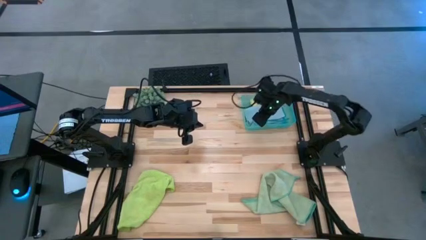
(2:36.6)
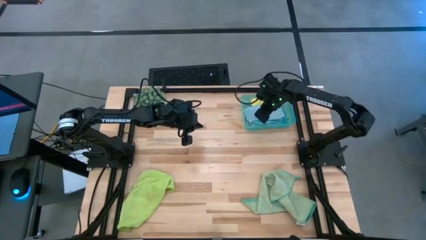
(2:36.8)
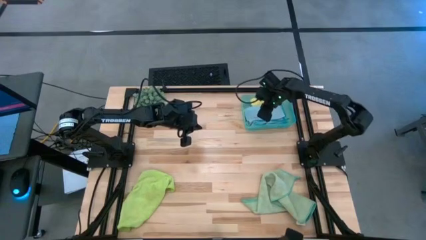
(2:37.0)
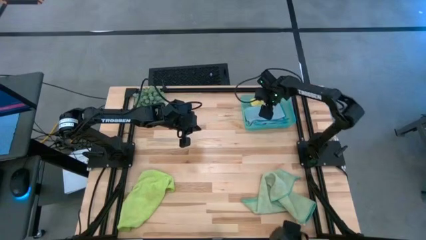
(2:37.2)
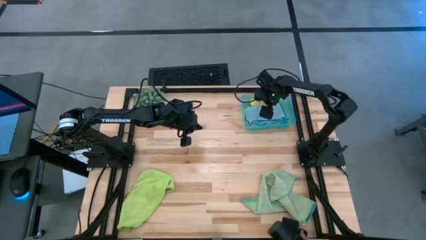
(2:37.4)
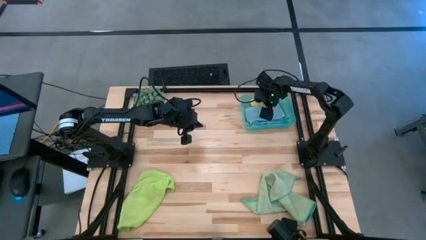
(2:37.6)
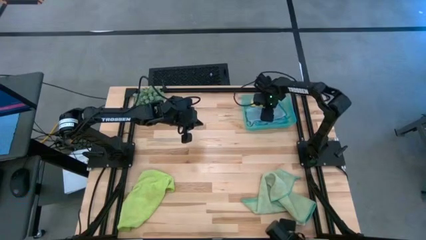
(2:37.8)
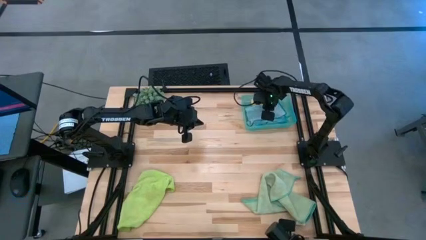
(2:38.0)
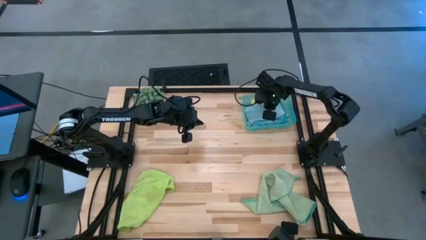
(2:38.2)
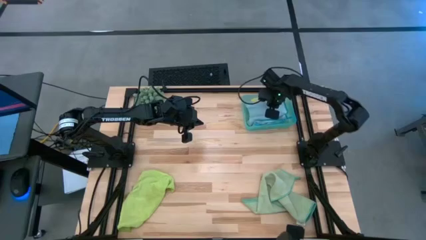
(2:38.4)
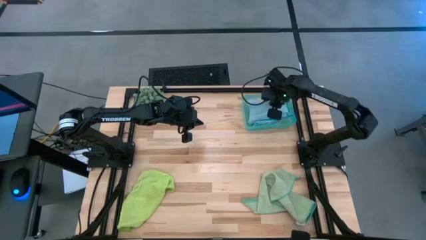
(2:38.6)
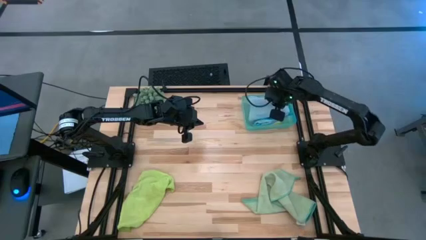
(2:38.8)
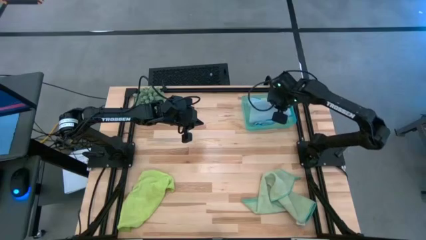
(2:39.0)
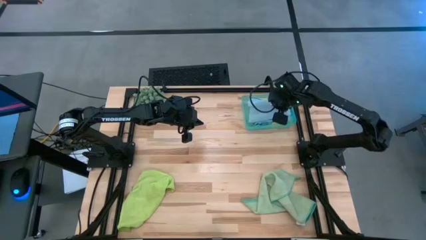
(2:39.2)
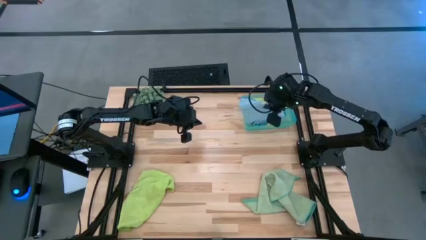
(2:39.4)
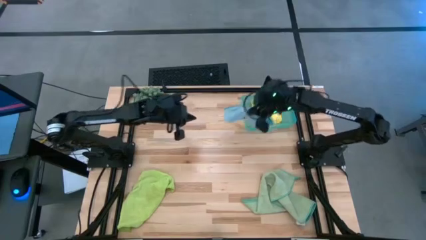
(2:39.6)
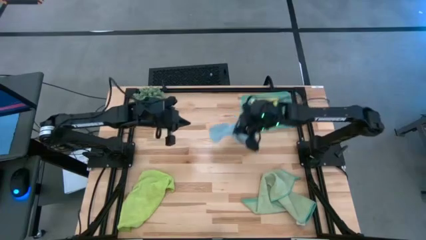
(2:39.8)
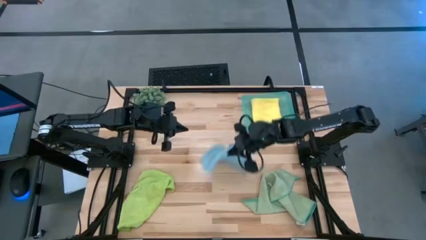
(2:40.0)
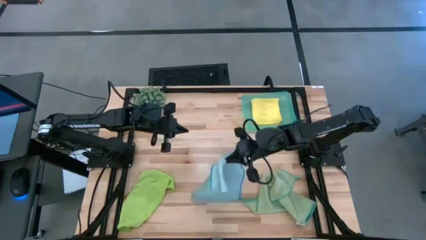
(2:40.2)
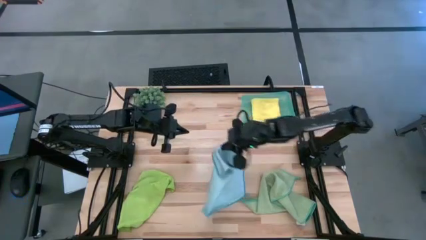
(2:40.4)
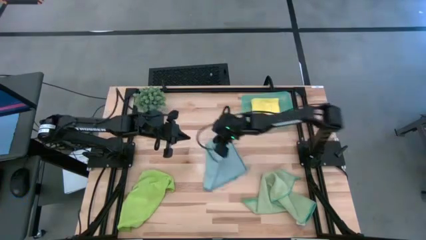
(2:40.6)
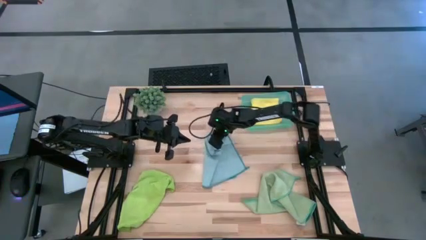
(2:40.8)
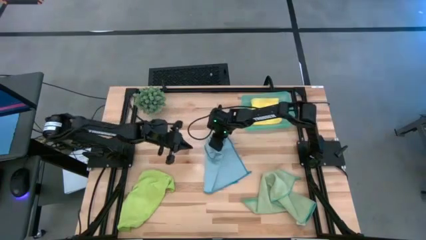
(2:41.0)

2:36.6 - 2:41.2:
Task: Fold microfiber towels
Remove the blue microfiber cloth from the blue bin

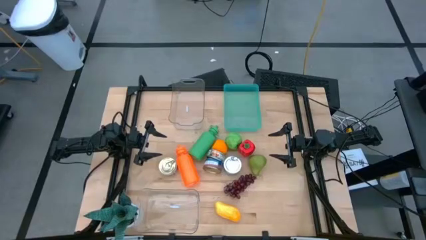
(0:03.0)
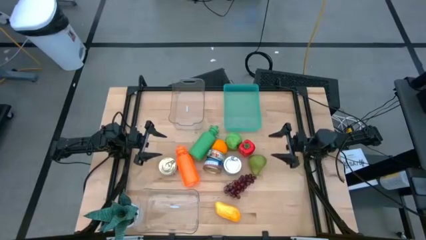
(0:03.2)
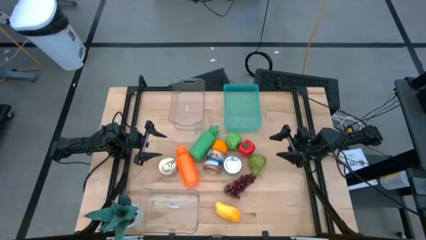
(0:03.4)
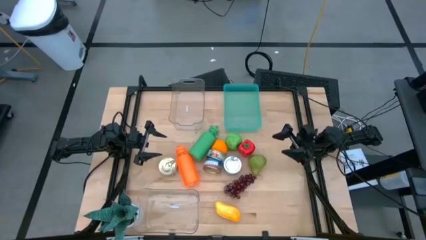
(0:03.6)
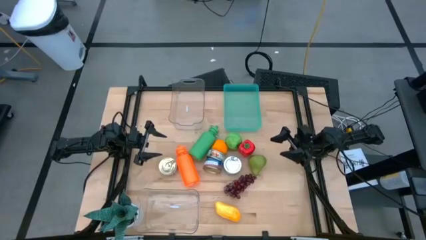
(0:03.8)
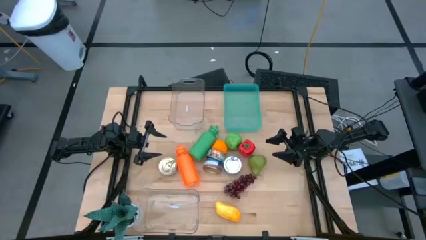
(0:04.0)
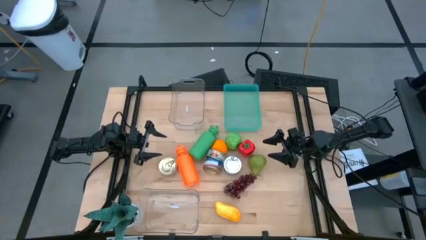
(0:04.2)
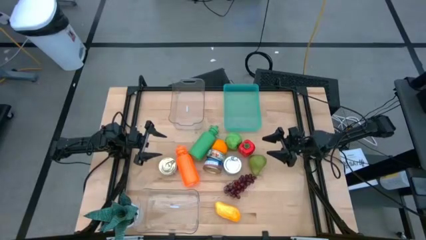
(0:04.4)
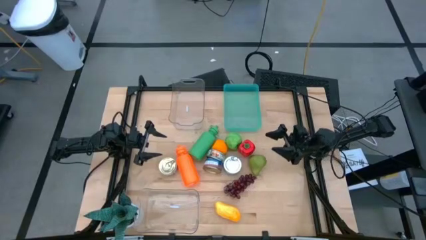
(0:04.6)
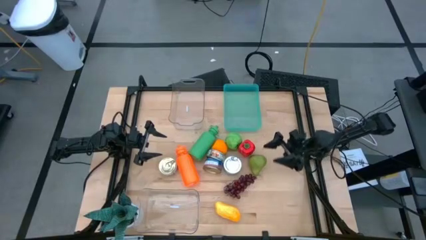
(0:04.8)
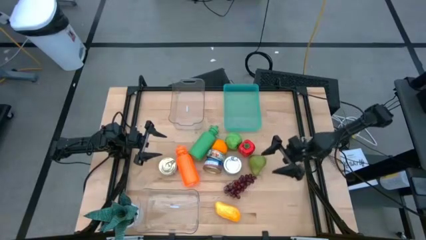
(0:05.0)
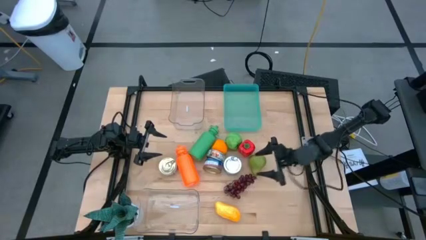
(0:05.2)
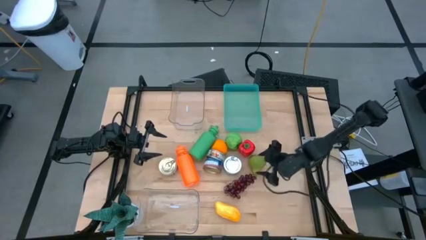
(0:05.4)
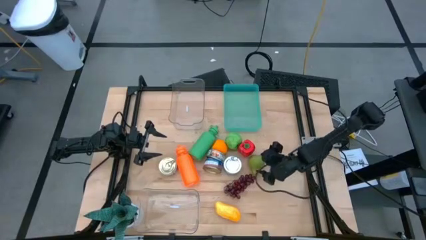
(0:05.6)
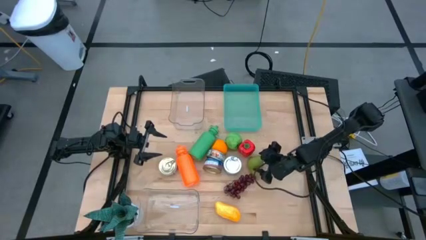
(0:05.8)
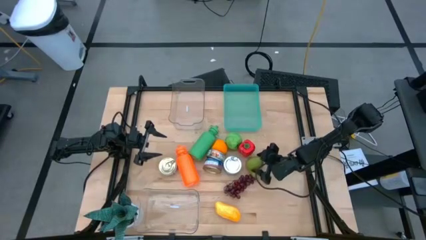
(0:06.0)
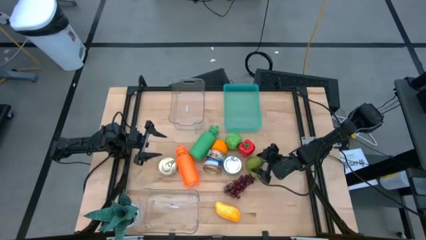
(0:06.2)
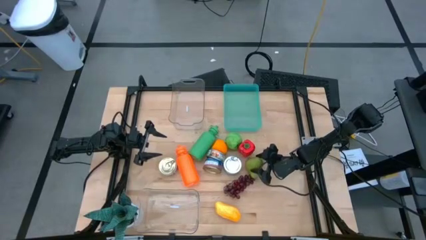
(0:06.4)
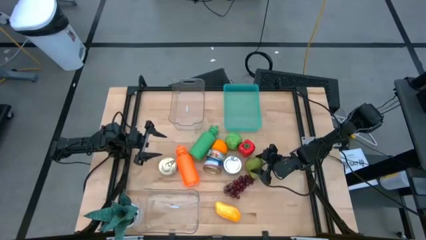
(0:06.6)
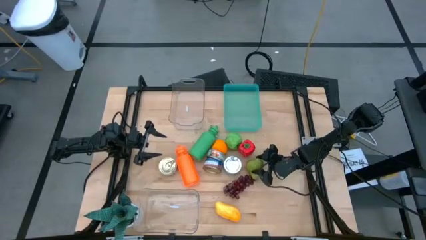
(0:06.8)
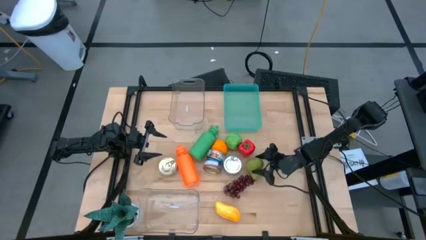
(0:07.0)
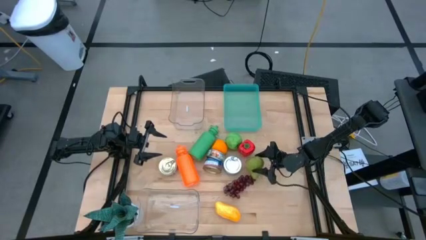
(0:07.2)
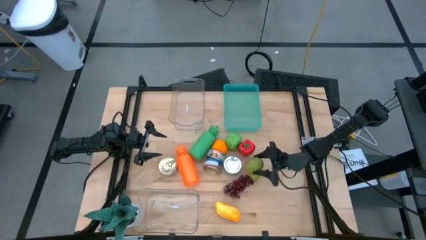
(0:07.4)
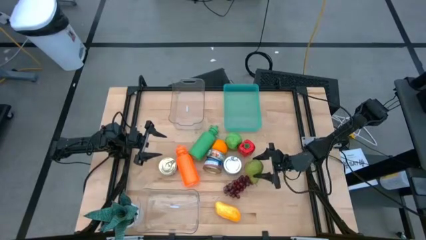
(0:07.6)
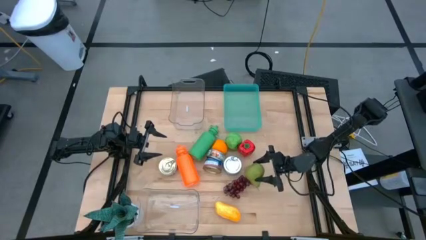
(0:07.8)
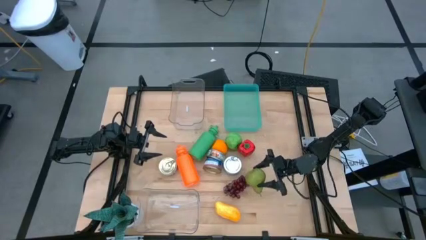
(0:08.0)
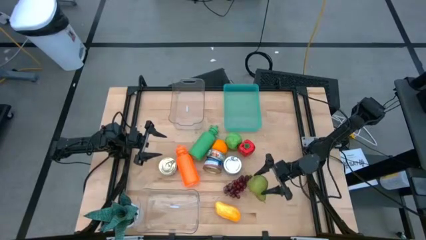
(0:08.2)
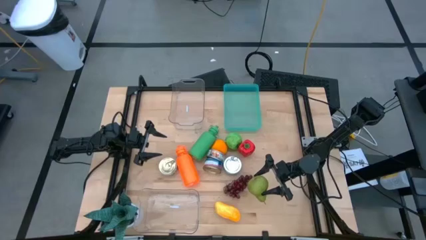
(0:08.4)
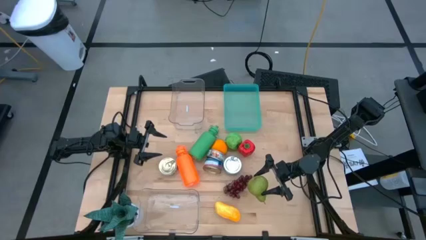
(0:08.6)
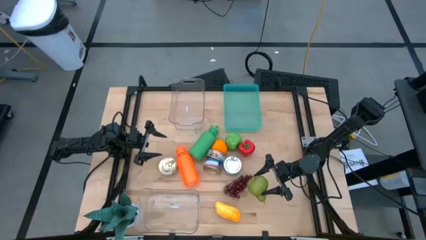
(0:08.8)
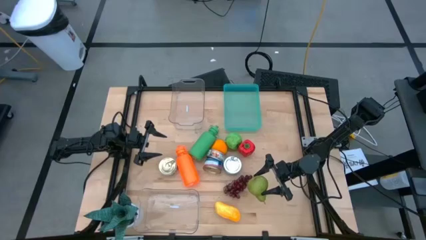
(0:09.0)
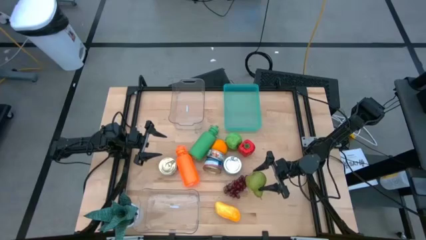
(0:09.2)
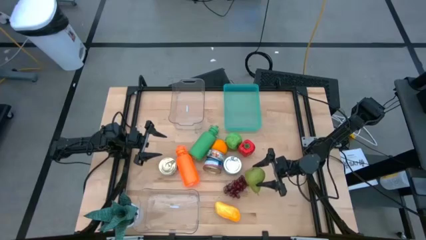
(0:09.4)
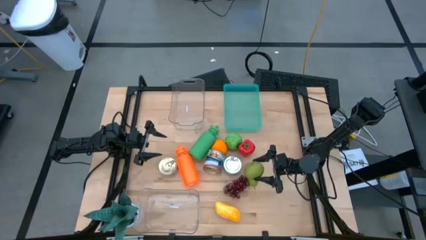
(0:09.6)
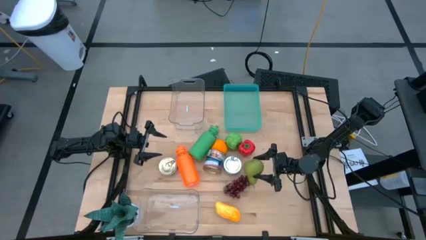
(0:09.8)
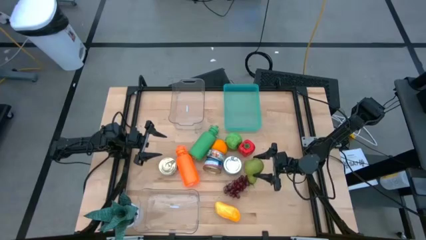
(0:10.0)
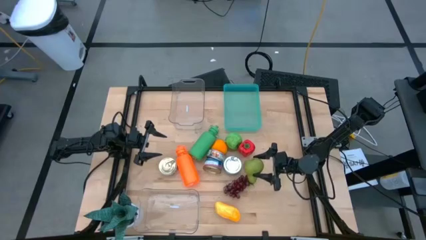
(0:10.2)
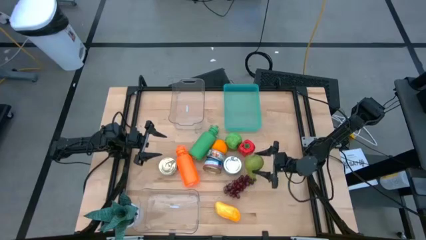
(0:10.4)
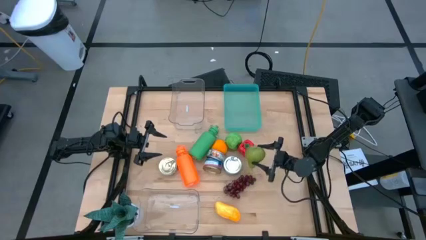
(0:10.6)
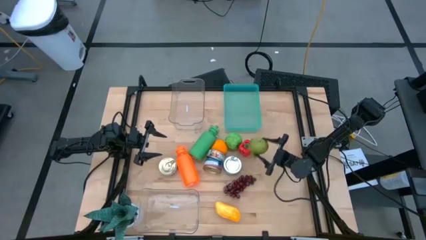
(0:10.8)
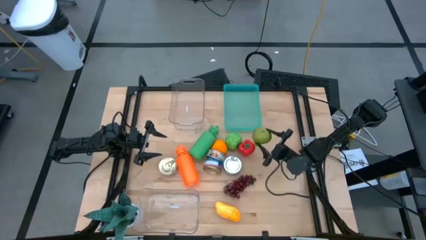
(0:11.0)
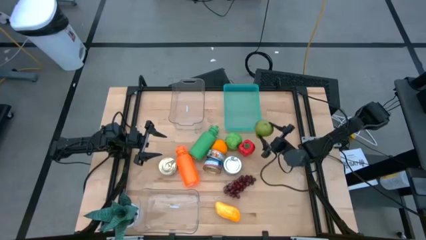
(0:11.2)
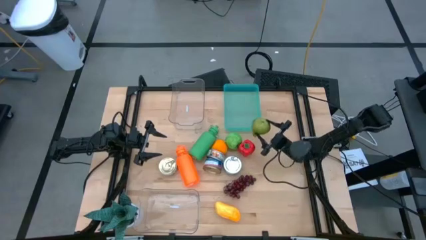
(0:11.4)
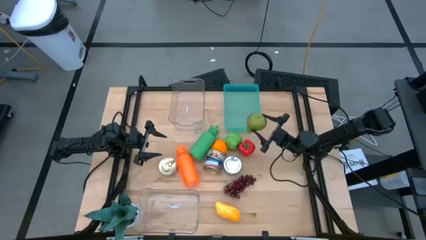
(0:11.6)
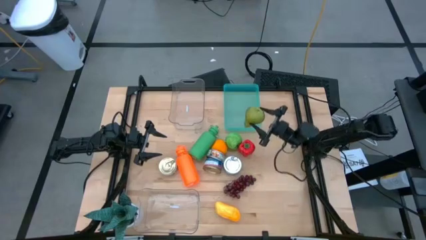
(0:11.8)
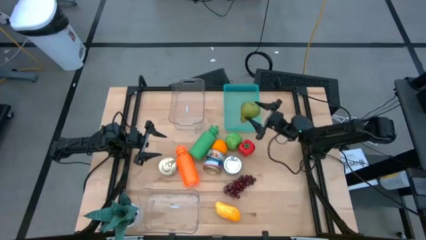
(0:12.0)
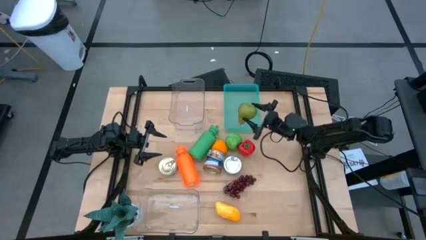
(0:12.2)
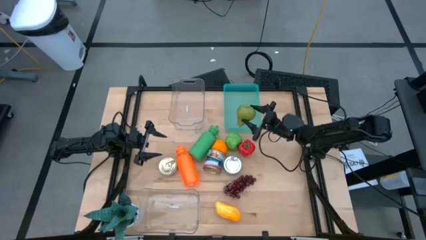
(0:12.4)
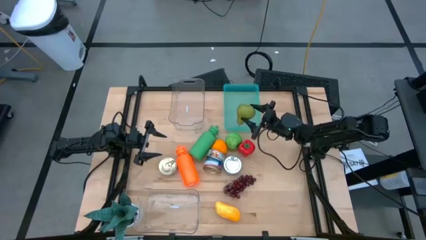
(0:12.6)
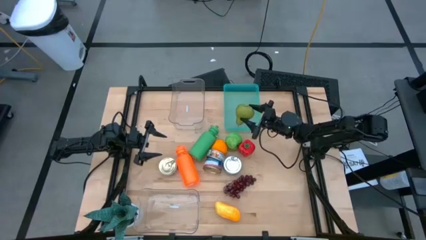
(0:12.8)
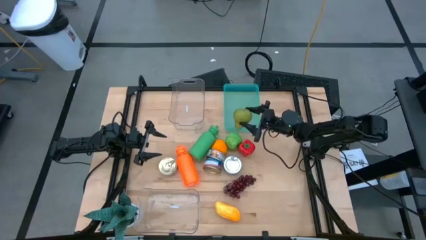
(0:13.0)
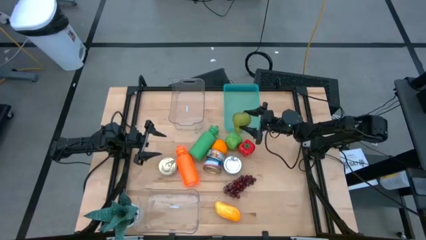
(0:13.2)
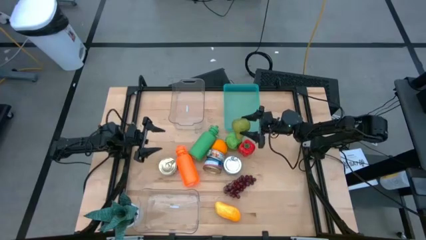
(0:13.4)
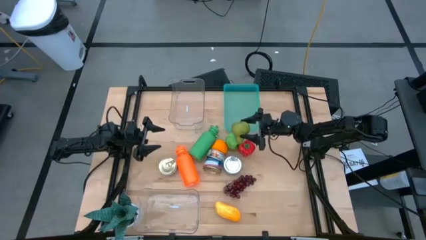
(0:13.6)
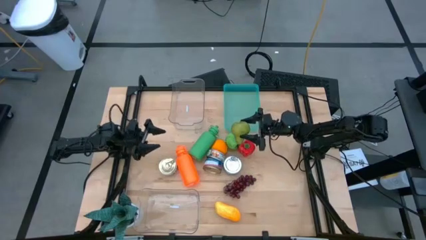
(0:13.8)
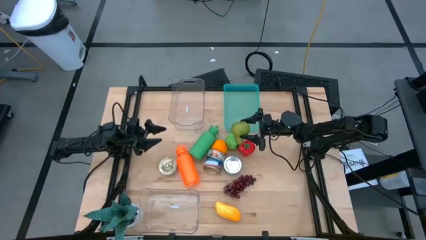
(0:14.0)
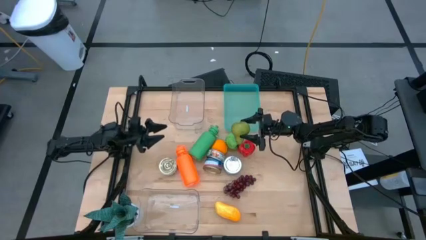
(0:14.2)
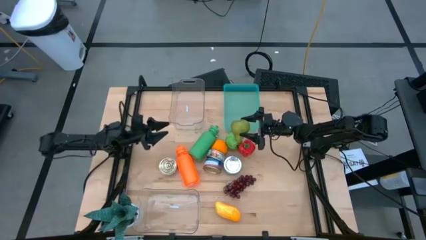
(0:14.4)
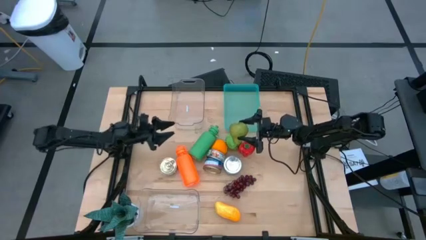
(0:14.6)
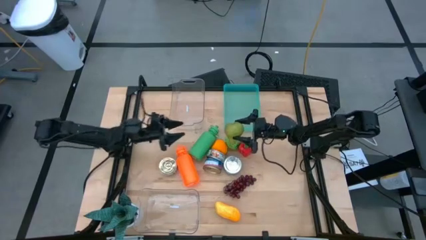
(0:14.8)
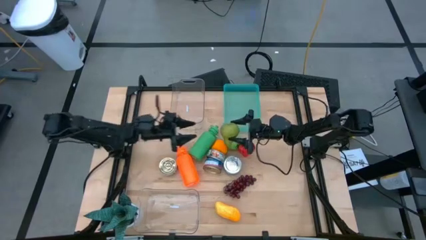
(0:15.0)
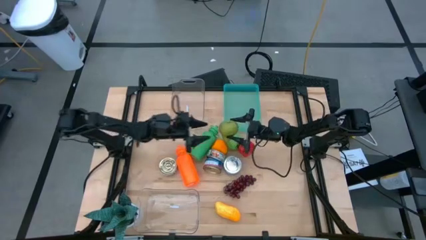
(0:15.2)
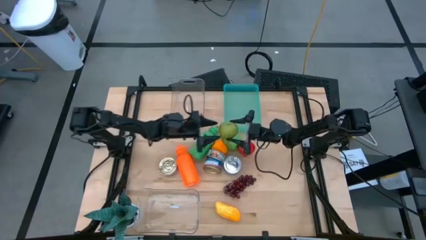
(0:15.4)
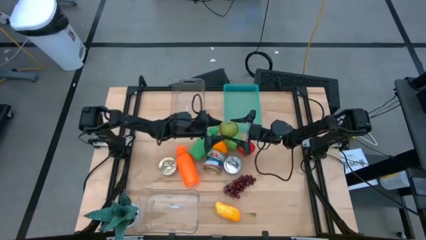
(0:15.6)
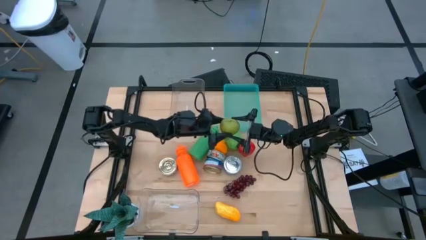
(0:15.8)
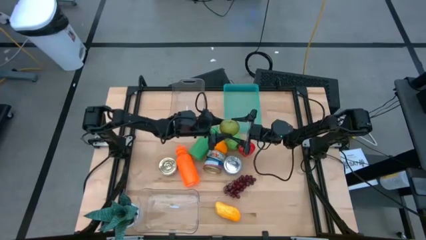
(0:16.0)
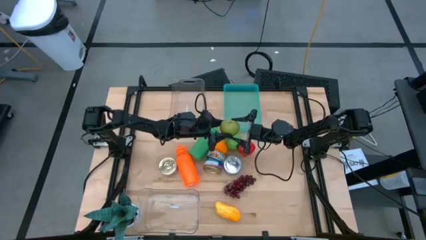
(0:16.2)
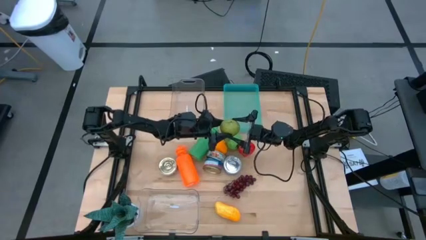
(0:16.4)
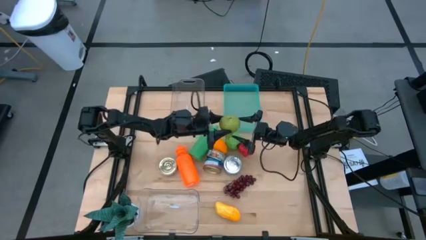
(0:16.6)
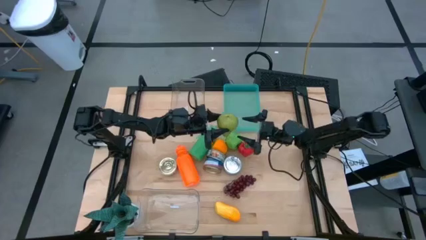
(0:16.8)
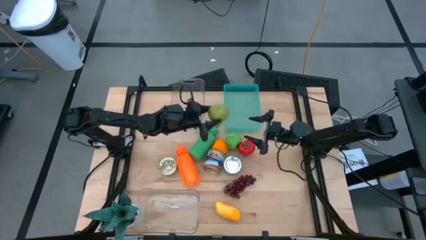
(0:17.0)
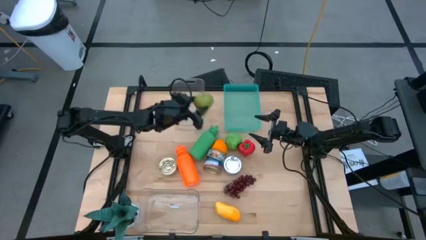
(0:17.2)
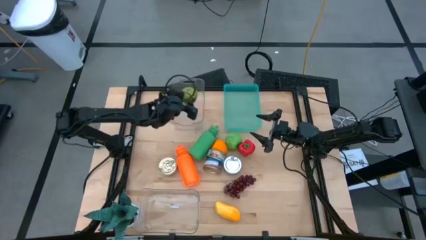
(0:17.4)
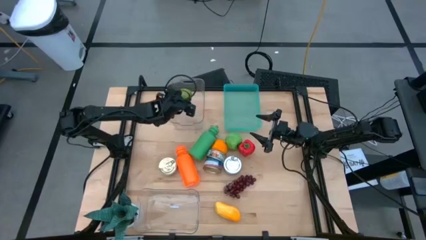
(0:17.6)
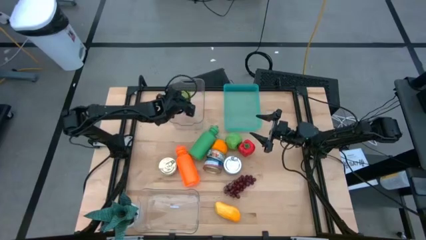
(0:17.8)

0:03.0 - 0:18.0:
Task: Pick & Place Food Item
Put the green pear into the top transparent bin
